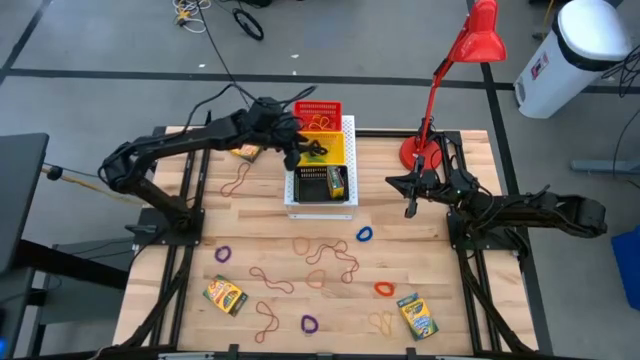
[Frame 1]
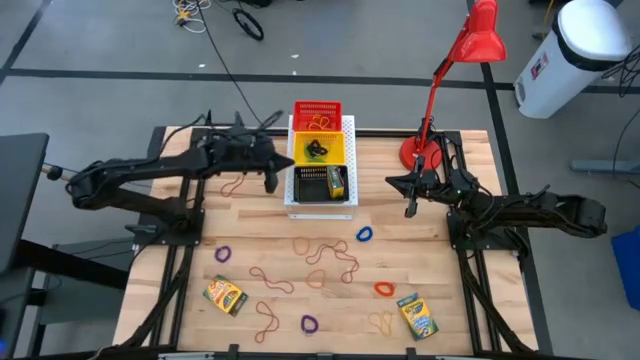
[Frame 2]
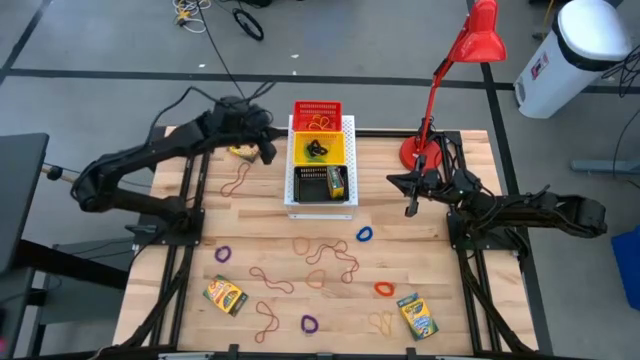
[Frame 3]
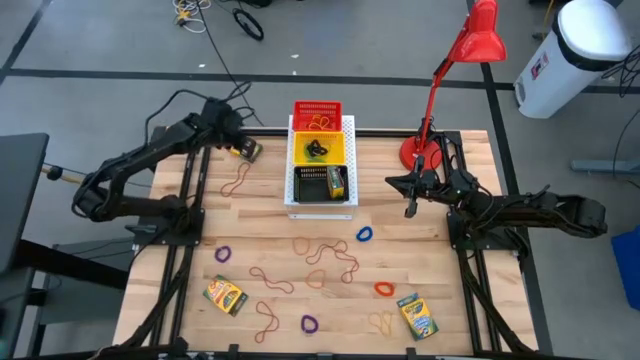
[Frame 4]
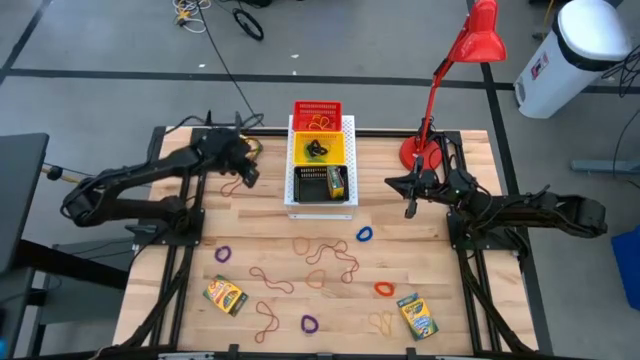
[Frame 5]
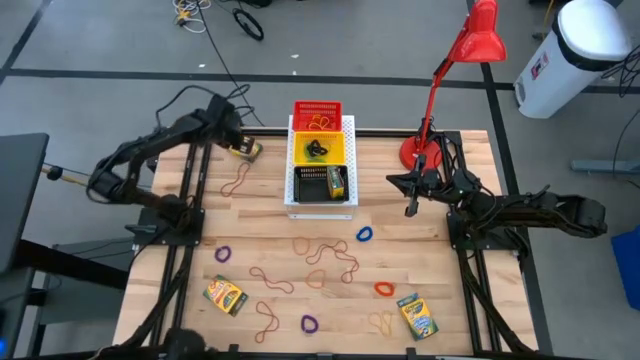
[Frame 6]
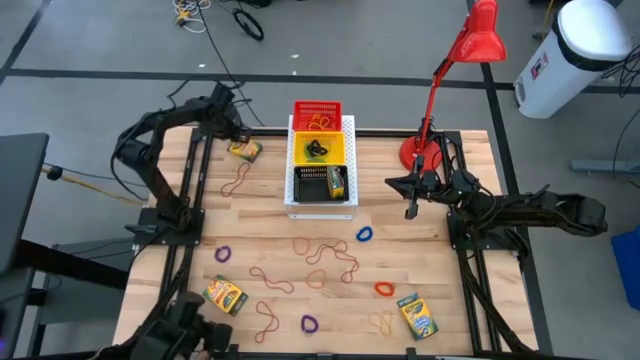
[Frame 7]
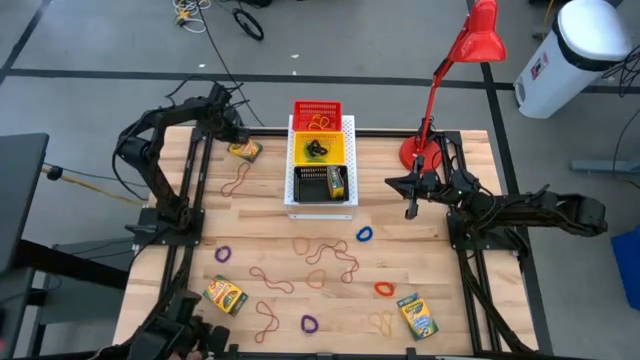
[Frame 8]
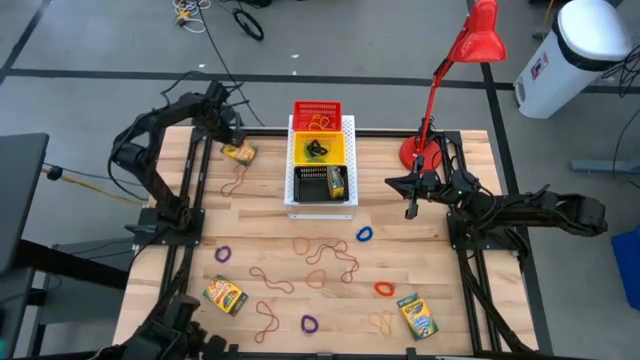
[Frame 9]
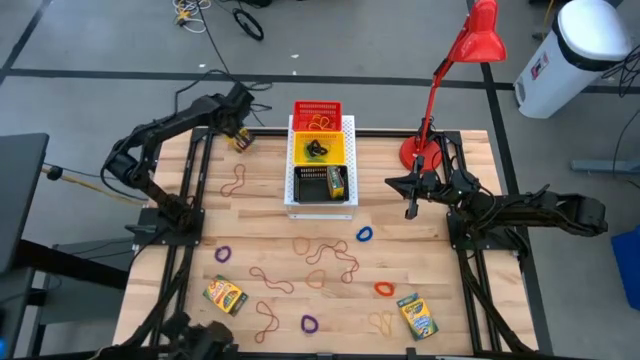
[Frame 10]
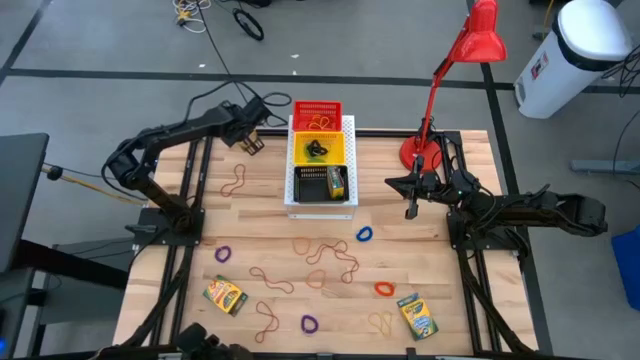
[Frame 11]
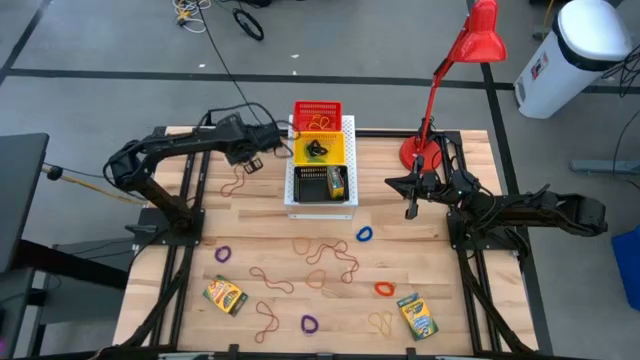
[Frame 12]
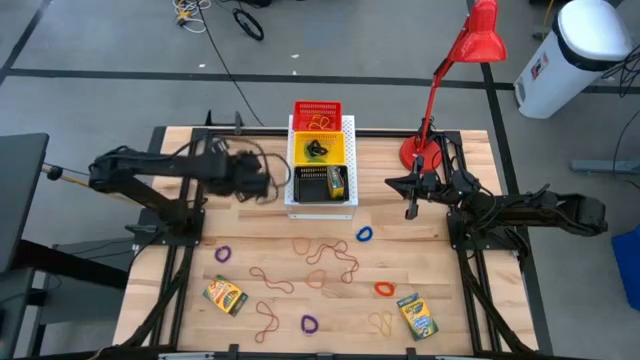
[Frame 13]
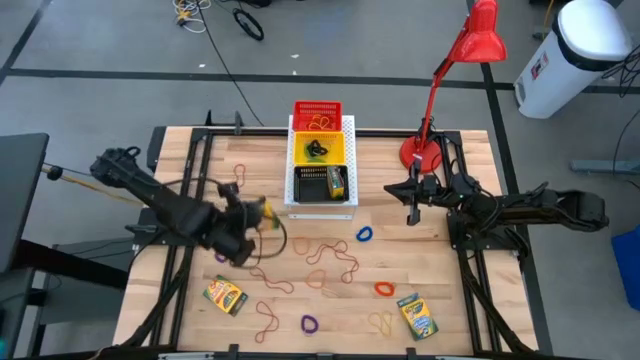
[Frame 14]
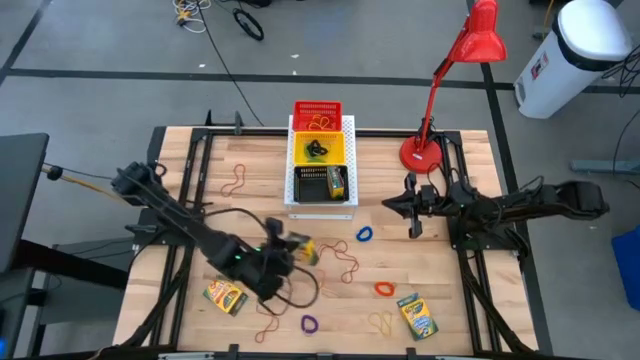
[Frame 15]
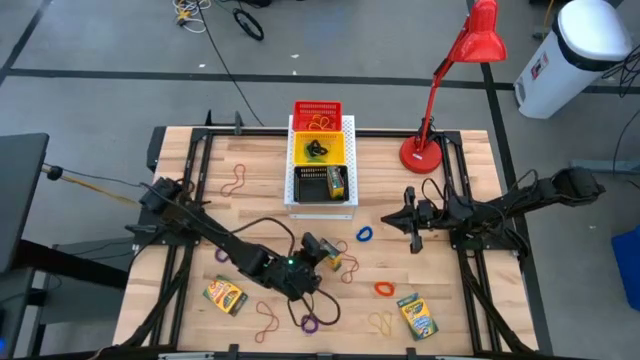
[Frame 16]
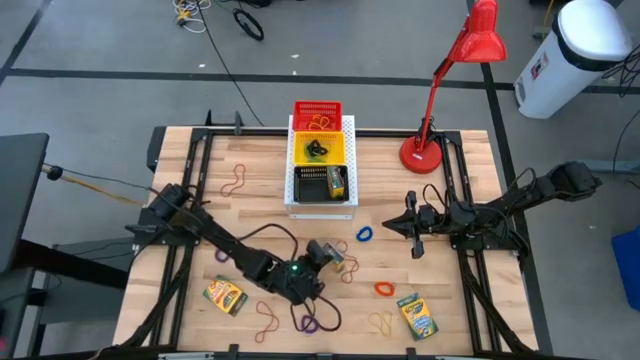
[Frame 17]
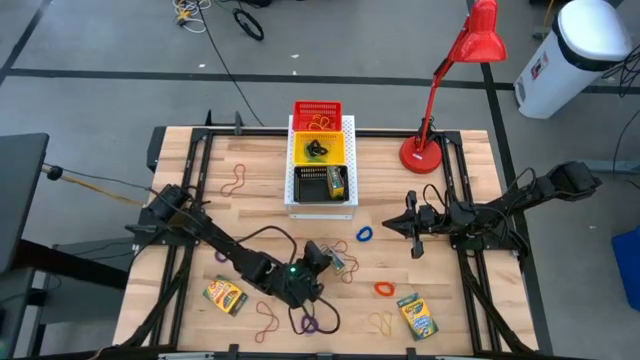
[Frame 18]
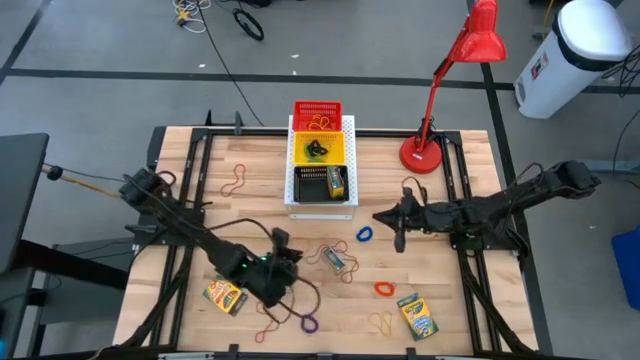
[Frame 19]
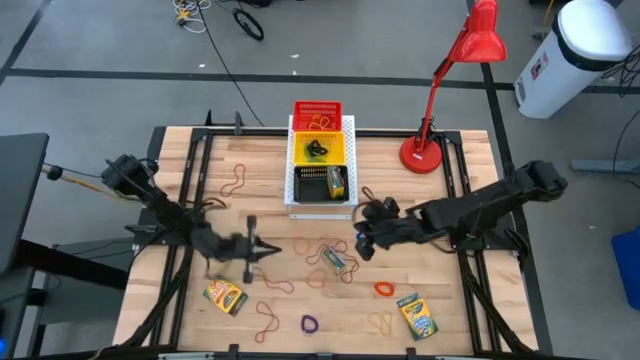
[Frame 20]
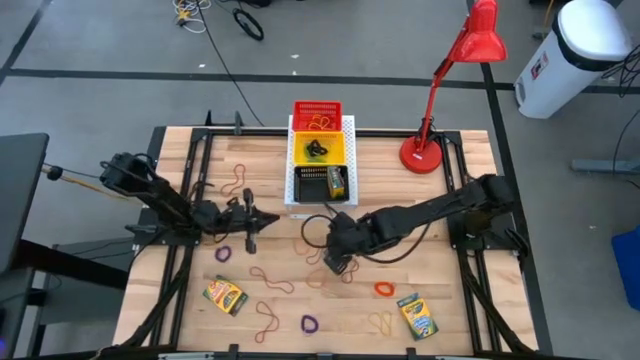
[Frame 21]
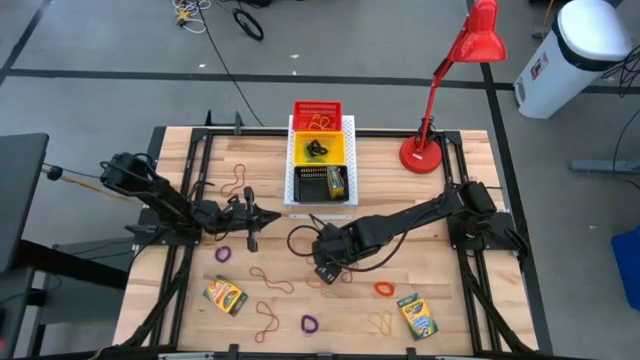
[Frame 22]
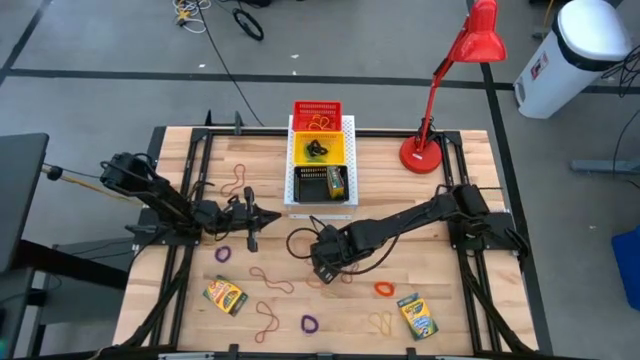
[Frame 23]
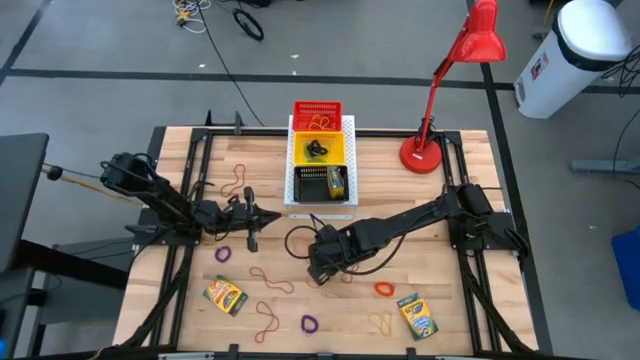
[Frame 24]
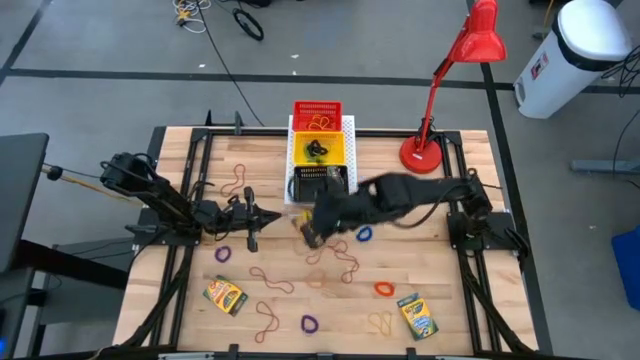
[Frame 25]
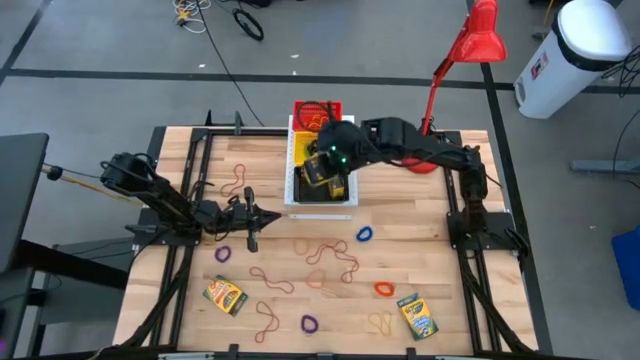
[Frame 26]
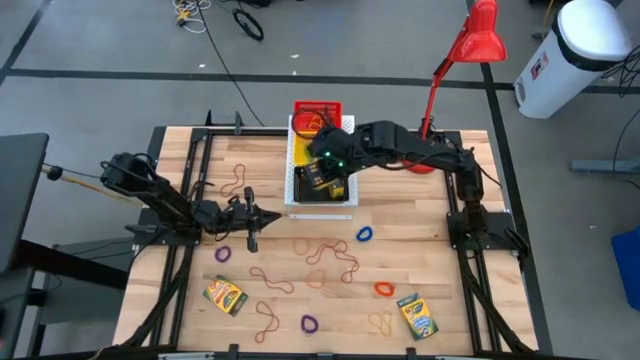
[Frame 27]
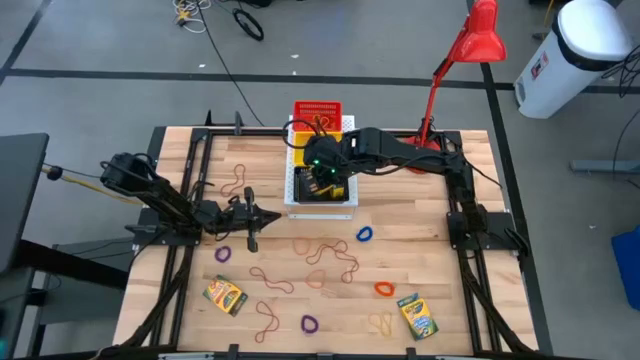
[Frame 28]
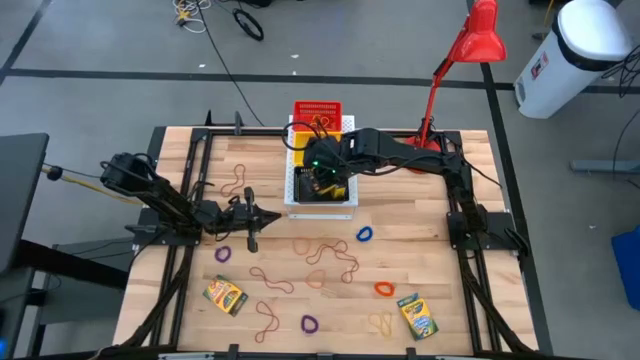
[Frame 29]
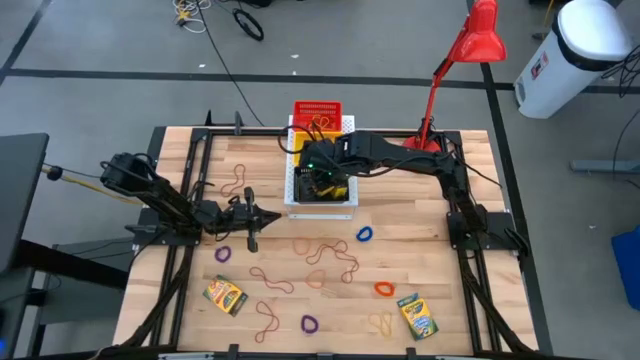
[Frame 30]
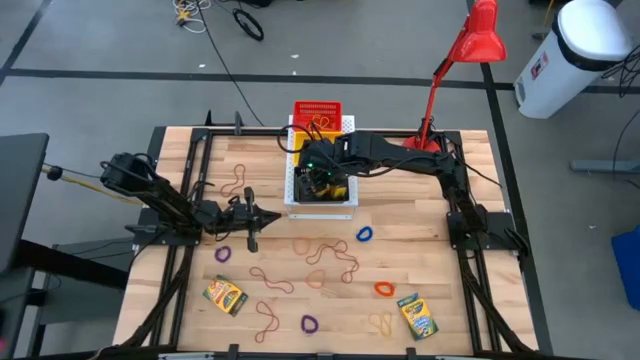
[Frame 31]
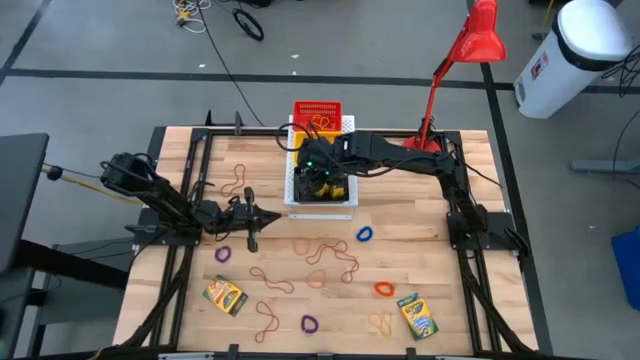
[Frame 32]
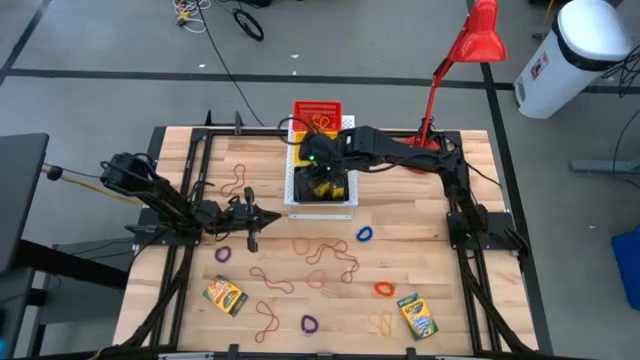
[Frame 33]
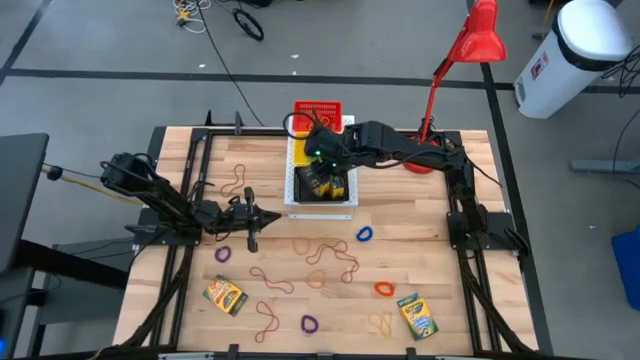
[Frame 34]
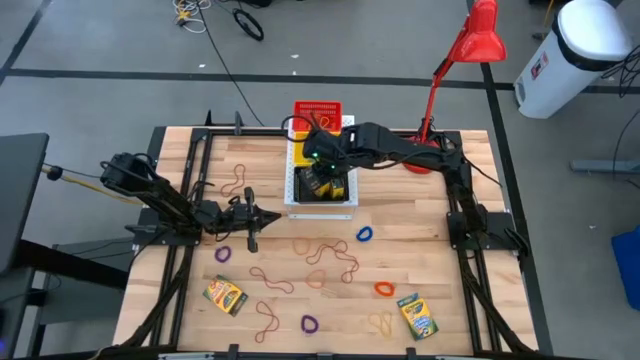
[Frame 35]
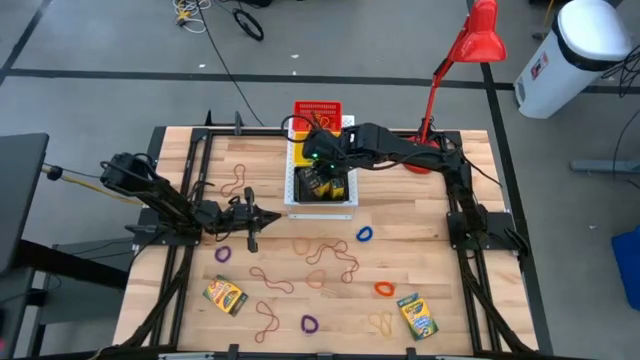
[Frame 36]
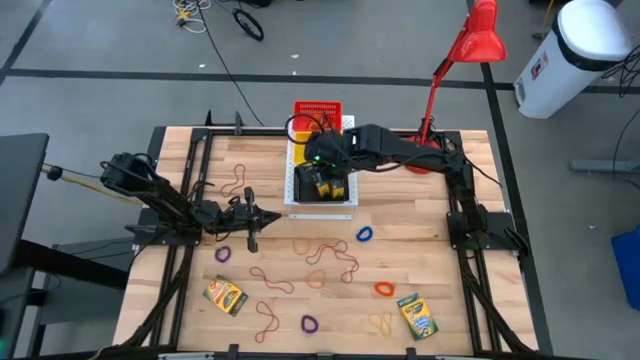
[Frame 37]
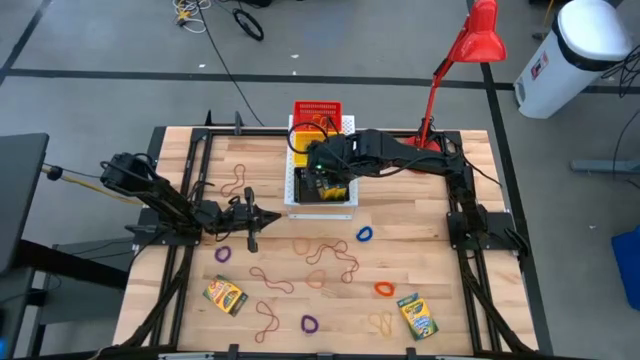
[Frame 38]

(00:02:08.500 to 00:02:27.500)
Task: Pick & Place Office Desk Supplies
Put the yellow crayon box into the black bin on the shelf

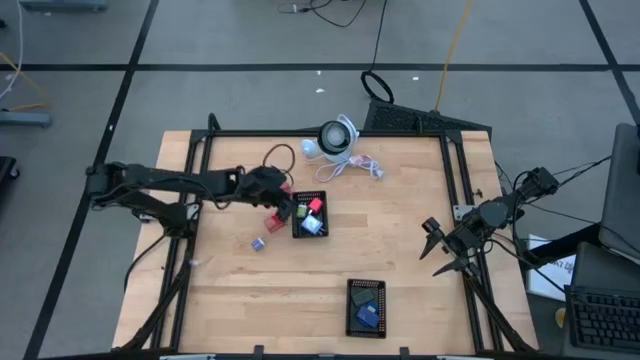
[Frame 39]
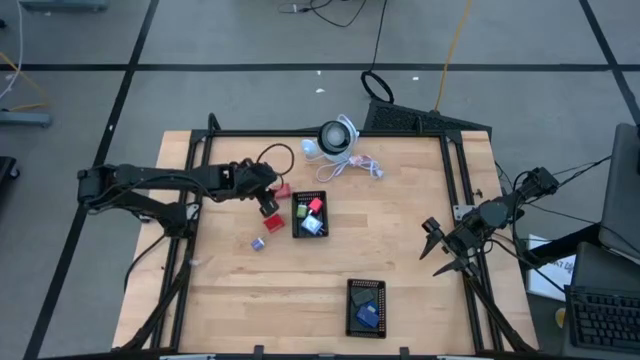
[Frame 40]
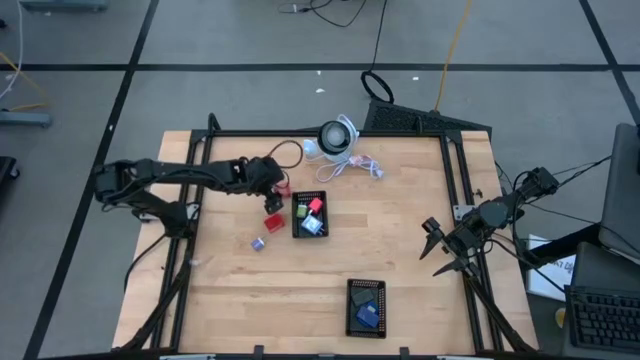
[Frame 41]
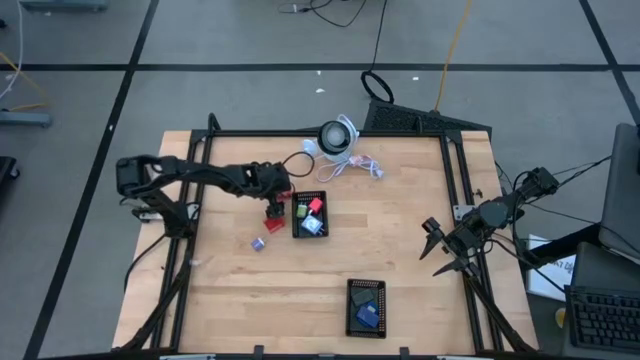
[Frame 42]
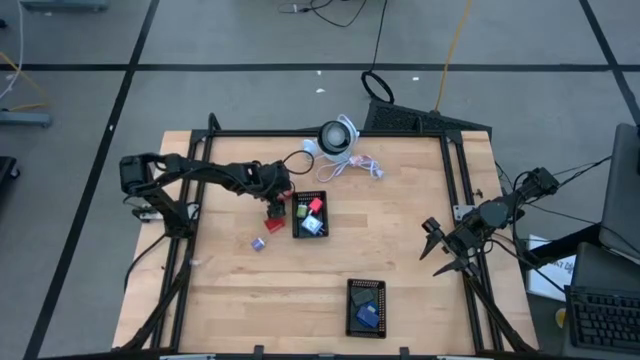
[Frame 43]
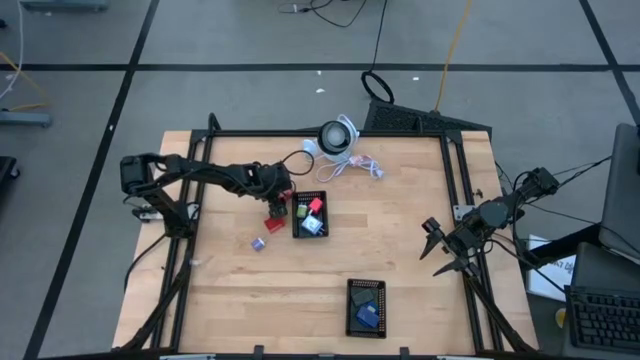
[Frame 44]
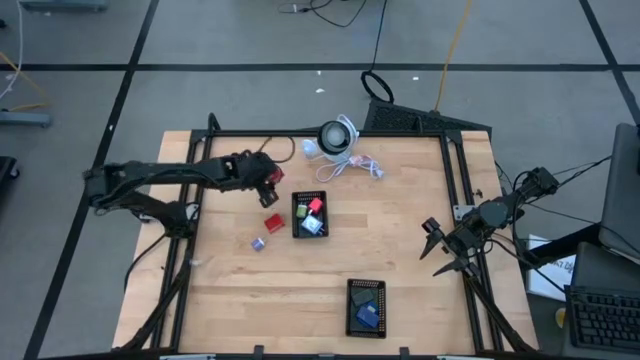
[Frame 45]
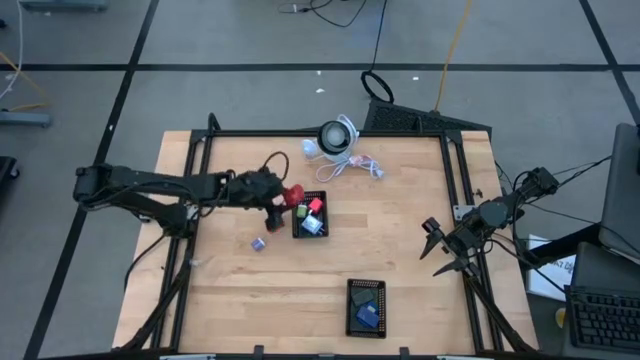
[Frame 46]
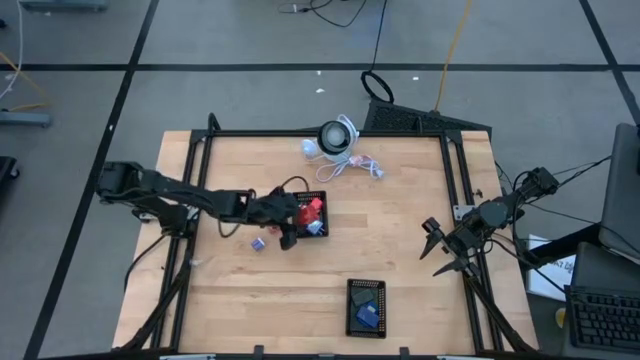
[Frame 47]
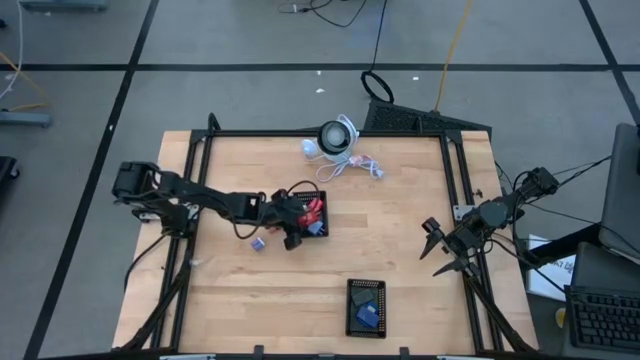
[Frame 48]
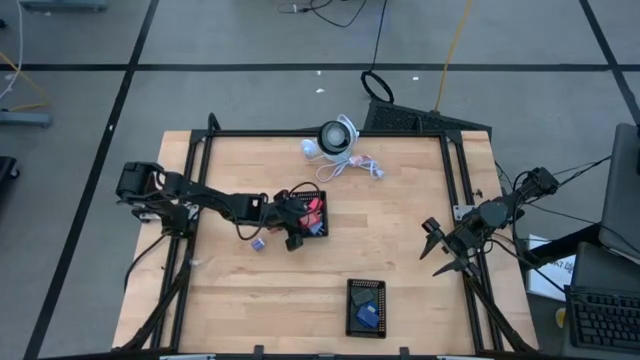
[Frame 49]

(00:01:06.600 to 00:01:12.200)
Task: Pick & Place Office items
Put the red charger into the top black basket
